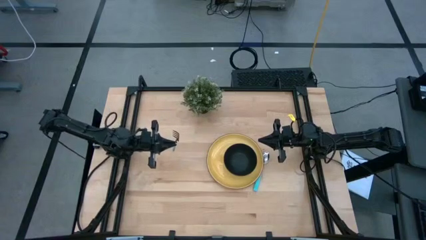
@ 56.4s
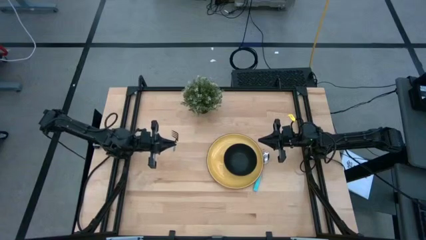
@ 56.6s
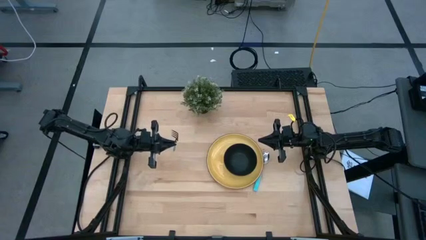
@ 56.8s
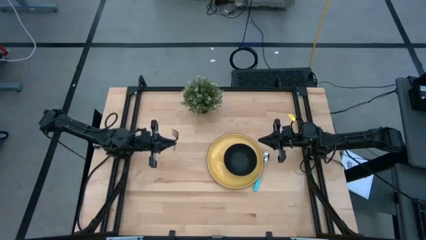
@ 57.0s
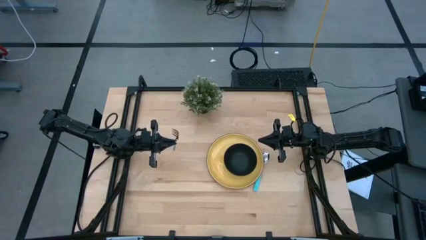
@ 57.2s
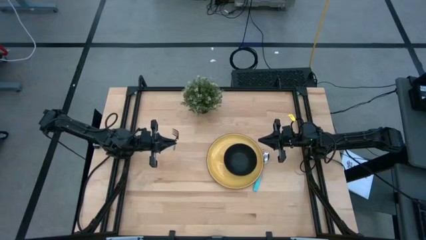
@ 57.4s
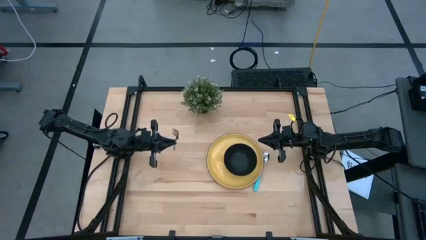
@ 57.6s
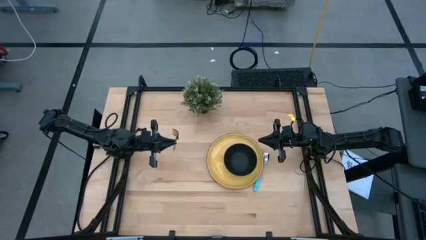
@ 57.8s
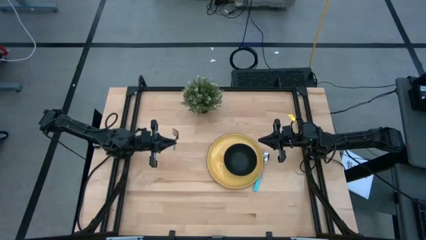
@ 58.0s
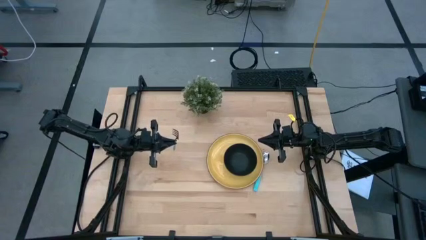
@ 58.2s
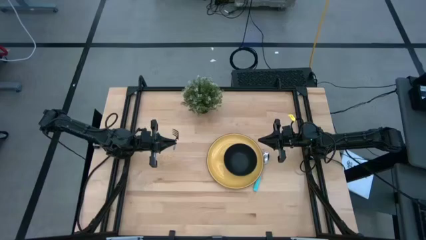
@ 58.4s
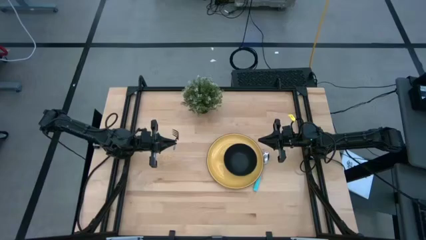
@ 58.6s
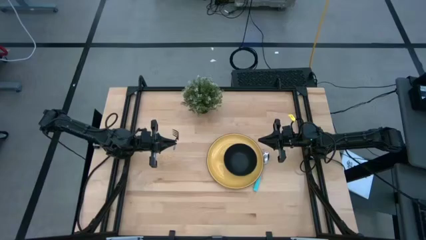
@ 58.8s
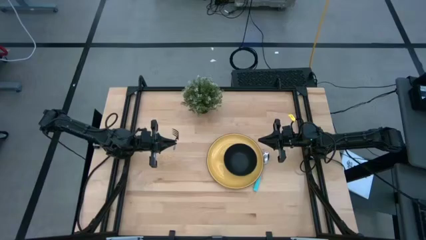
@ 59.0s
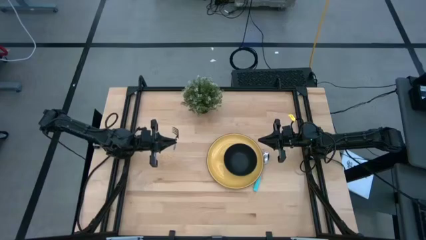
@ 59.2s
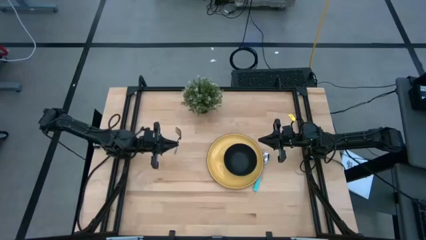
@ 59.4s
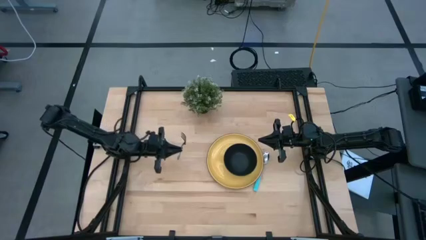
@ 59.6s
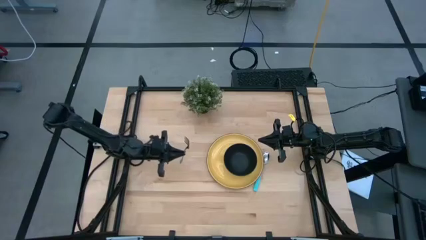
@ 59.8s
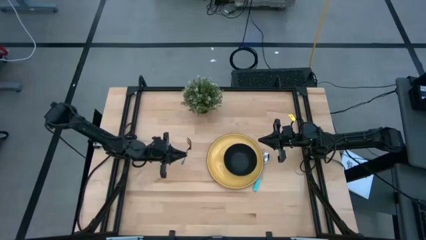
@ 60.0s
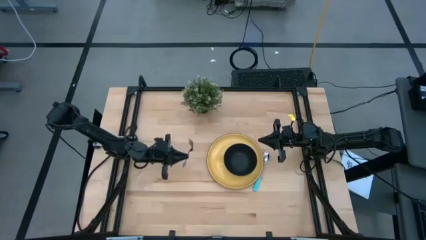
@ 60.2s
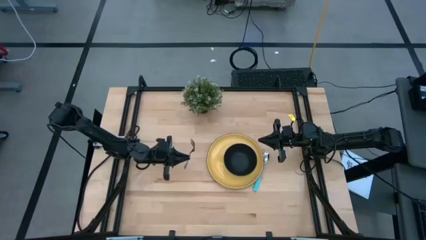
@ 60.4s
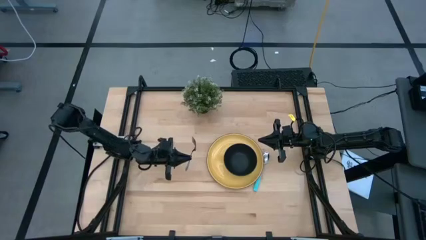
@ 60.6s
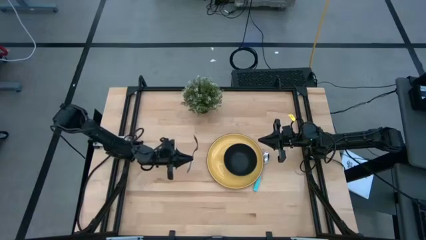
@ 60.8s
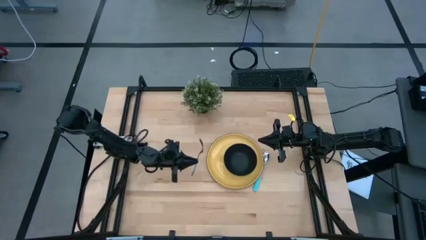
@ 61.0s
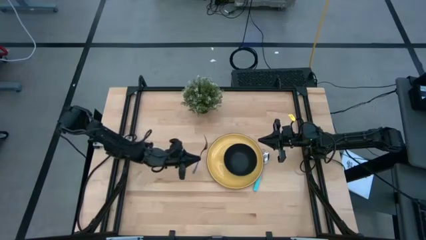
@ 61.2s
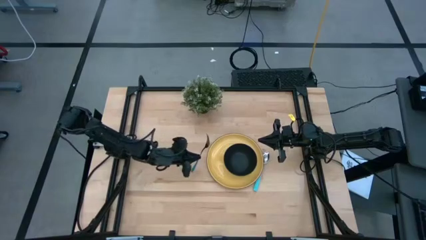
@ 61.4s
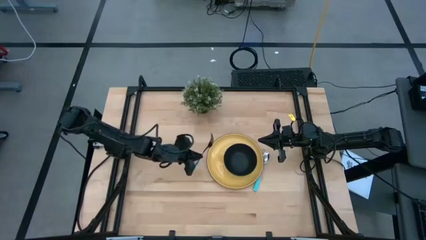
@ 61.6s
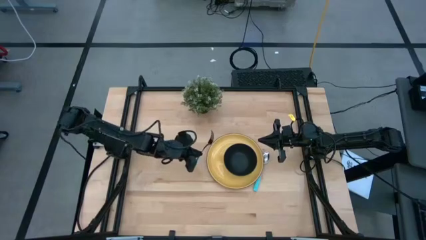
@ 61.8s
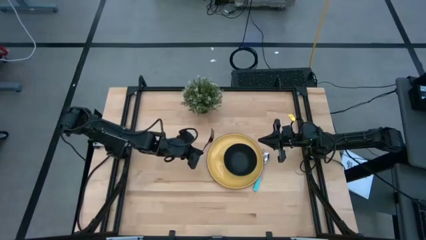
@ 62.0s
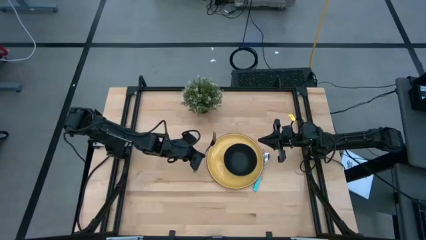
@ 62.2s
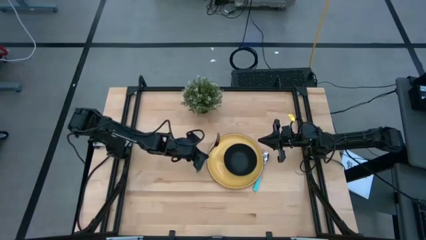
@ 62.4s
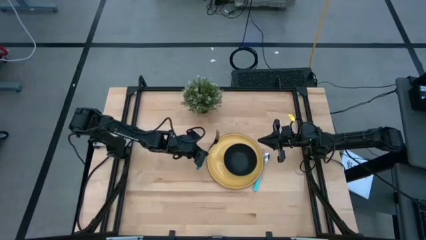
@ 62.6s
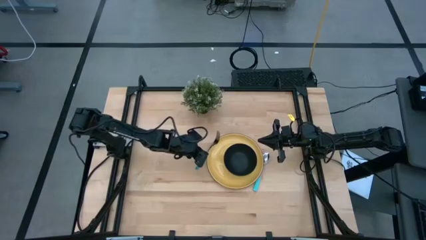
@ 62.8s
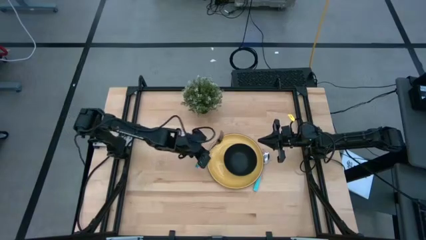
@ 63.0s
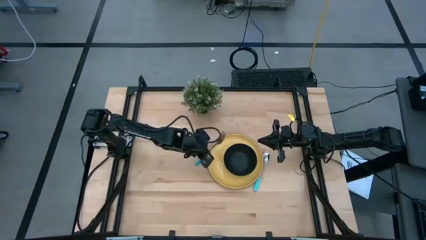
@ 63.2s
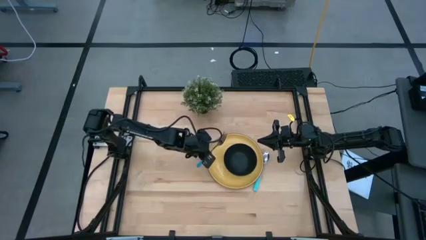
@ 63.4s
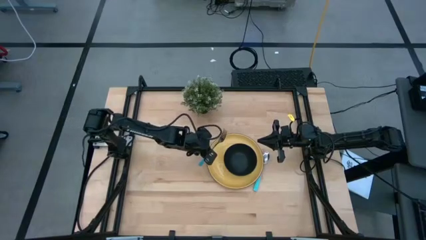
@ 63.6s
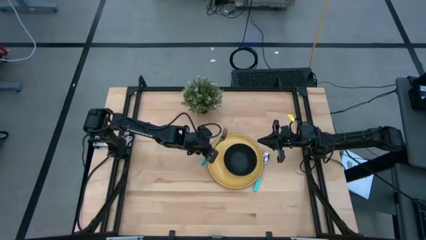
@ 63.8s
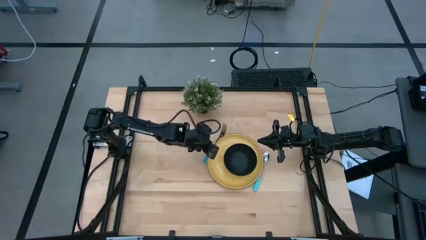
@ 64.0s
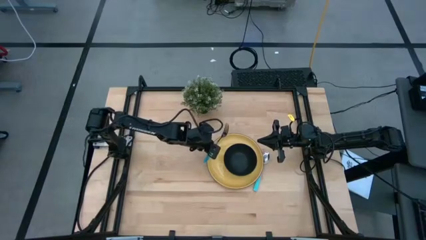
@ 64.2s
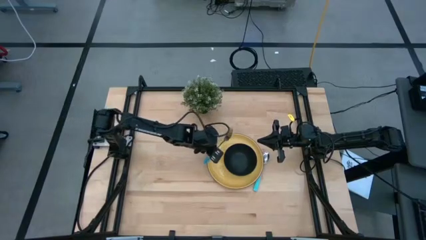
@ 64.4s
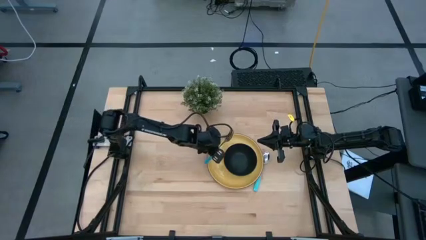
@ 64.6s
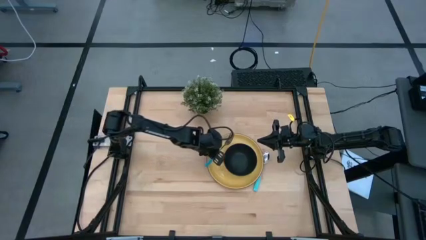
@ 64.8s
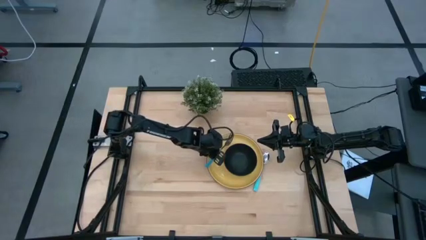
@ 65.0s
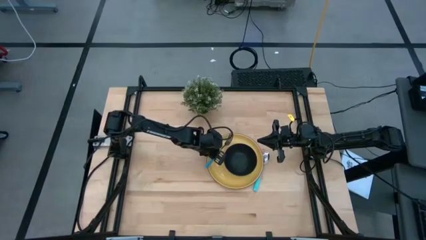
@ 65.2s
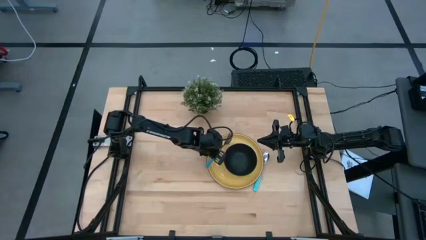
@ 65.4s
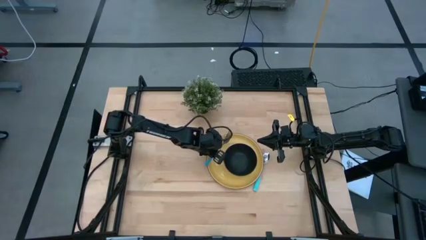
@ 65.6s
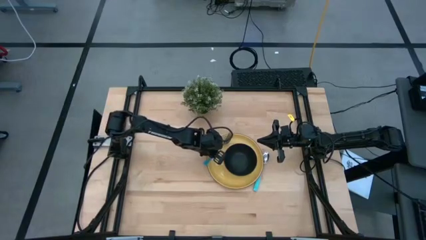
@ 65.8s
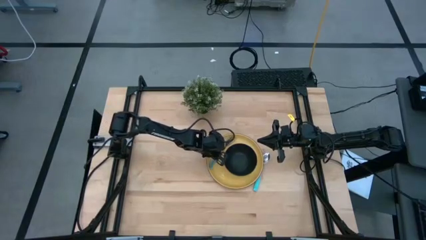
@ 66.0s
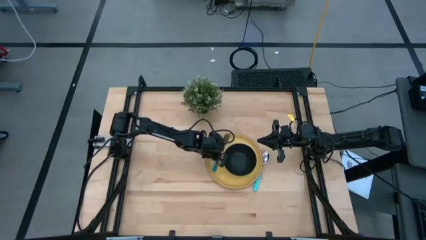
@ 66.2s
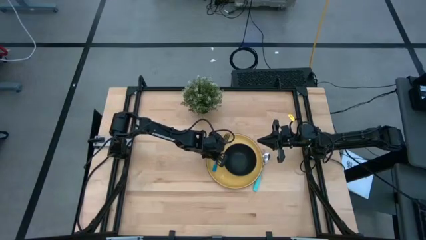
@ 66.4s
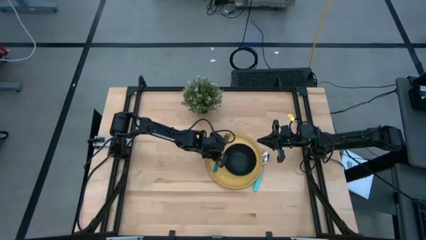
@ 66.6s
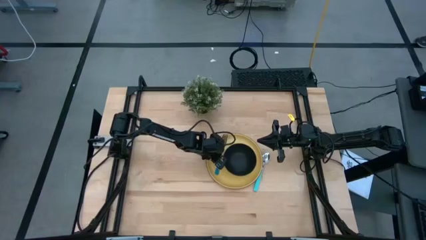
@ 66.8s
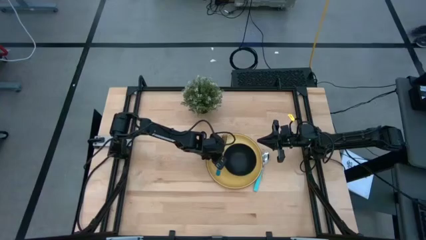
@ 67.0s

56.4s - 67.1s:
Task: Set table place
Put the blue fork on the yellow plate to the left of the black bowl

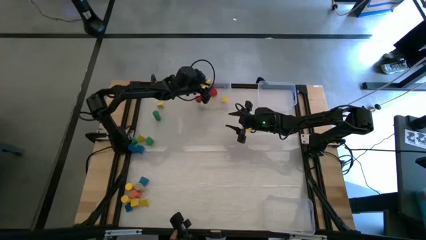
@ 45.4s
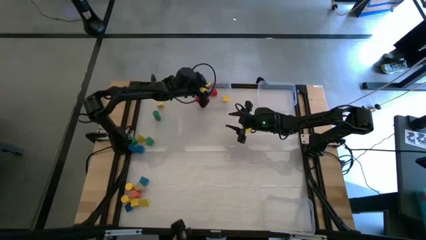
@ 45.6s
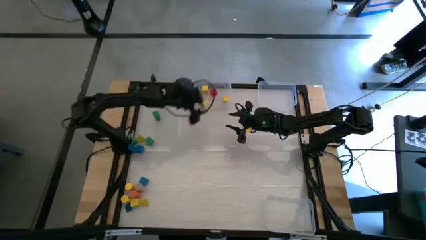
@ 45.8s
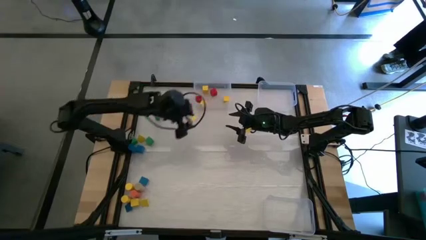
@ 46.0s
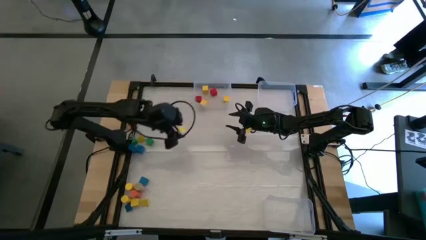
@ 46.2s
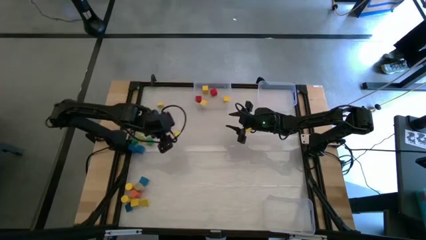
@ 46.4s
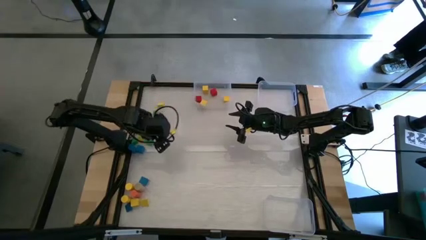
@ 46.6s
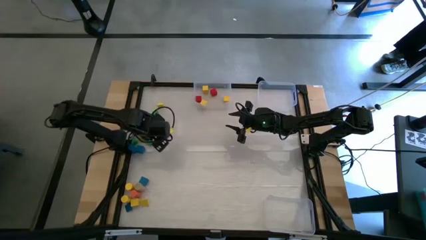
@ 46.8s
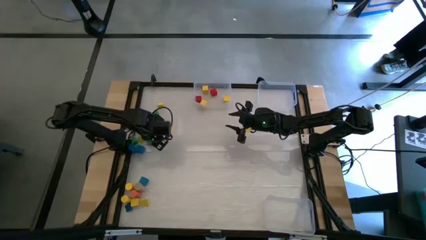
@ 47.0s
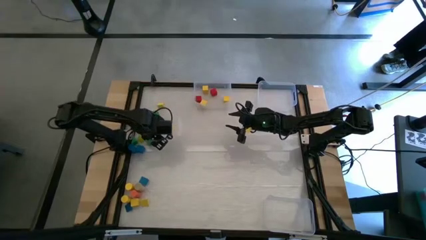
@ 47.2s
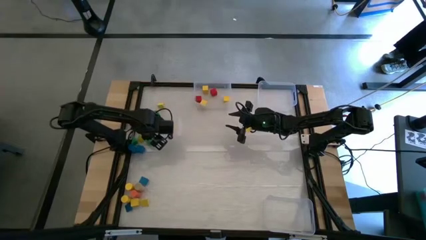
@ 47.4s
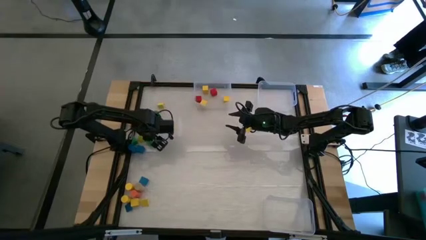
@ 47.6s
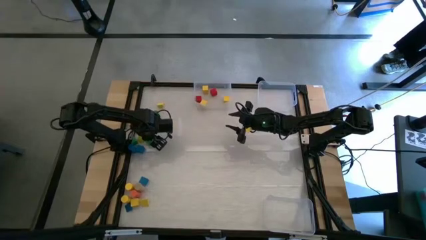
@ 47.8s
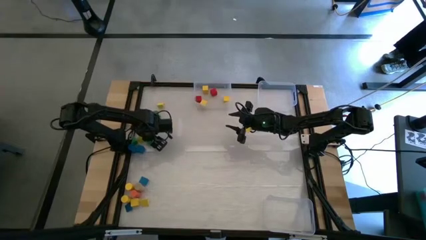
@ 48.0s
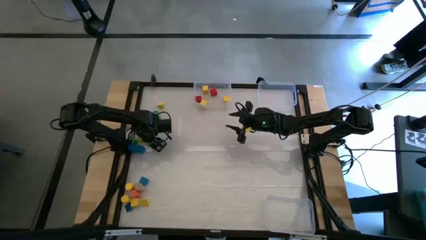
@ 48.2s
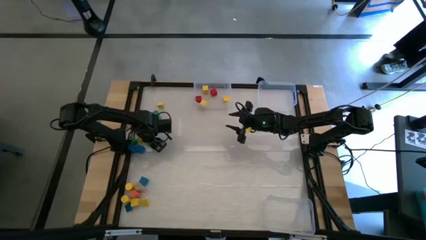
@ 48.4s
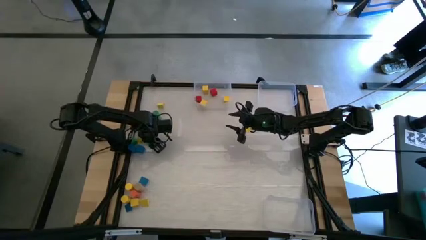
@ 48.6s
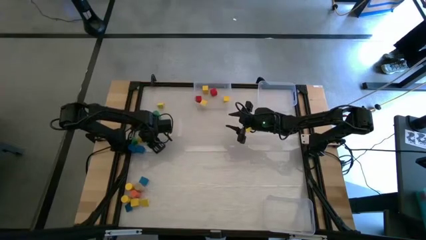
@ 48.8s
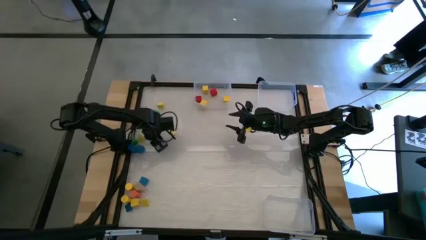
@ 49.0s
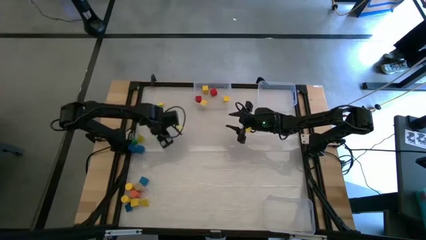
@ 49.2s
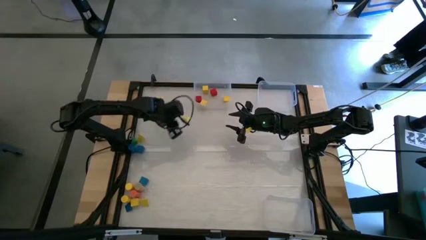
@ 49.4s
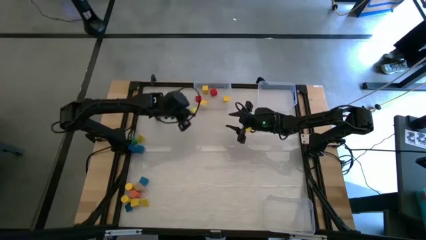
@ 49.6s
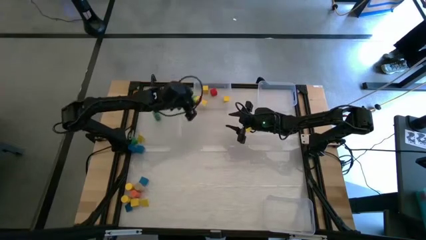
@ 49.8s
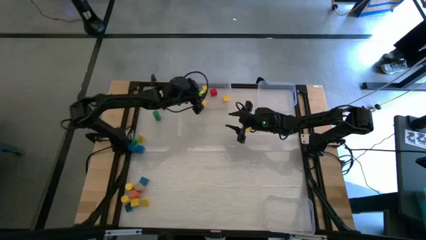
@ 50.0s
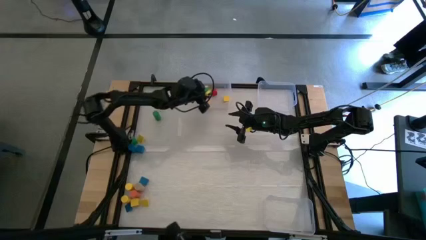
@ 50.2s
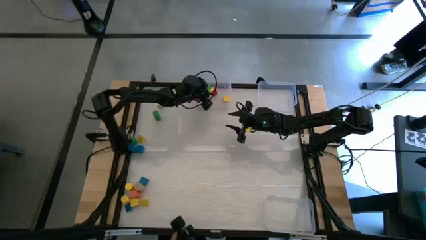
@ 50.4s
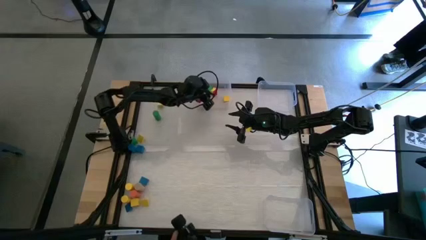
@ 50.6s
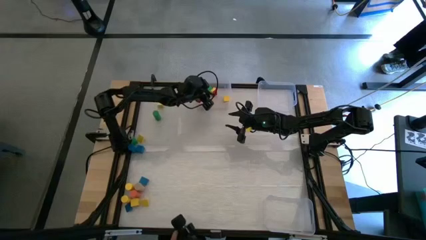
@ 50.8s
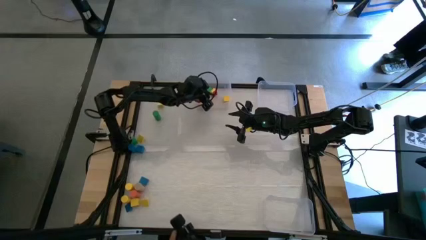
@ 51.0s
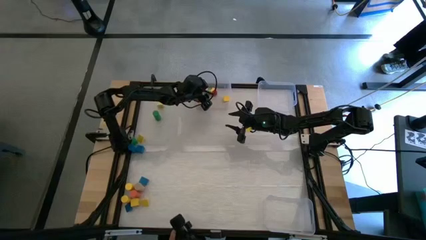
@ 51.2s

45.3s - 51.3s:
Task: Sort blocks by size
Put the square green block into the top left transparent bin

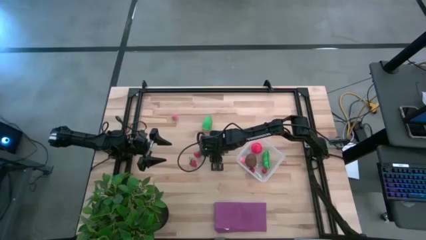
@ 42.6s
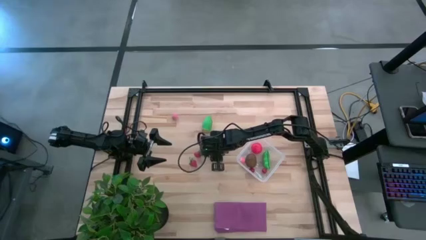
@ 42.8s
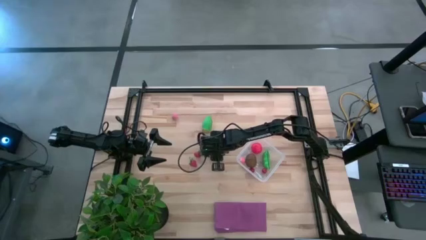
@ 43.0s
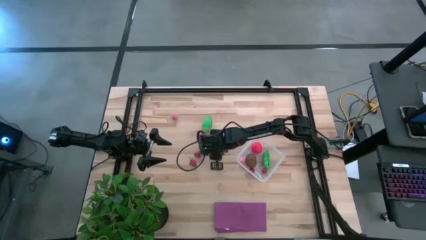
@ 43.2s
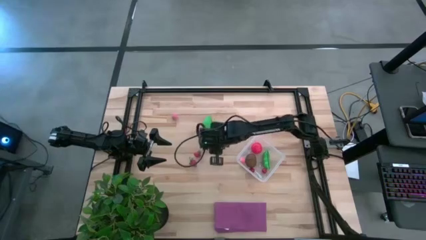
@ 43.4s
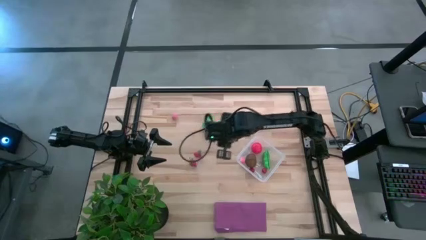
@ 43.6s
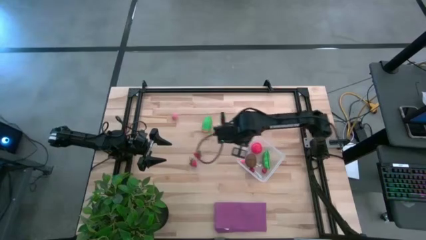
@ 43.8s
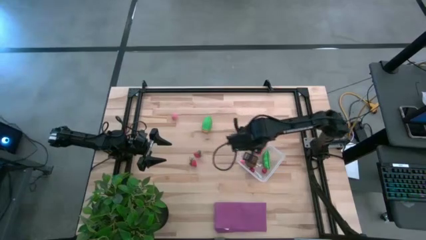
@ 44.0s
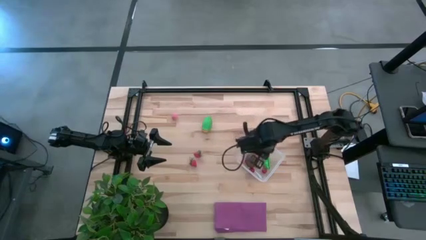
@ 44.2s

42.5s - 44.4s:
Task: Pick and placing Produce into tupperware
Put the bottom pink peach into the transparent bin
